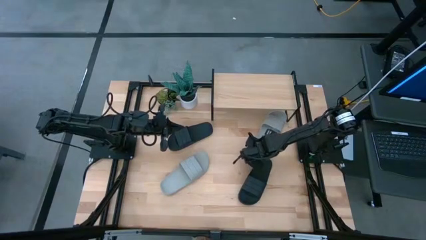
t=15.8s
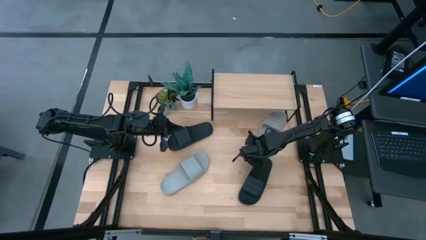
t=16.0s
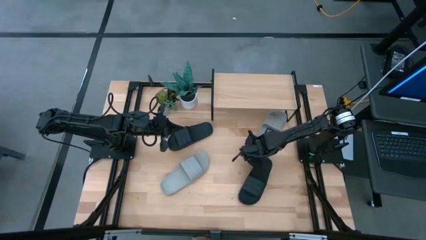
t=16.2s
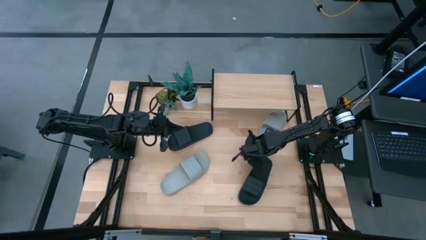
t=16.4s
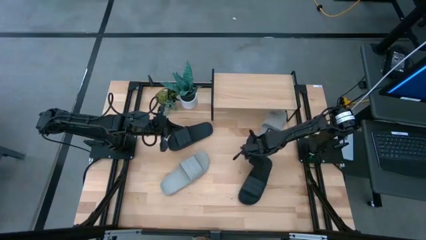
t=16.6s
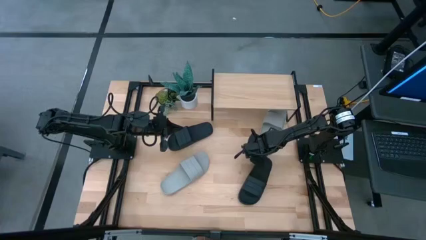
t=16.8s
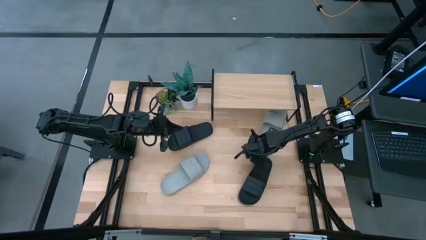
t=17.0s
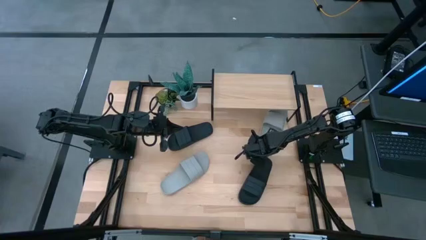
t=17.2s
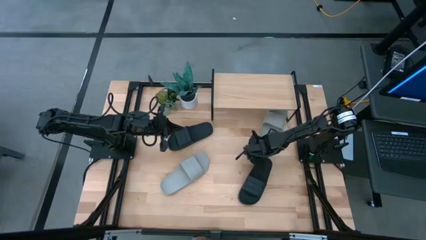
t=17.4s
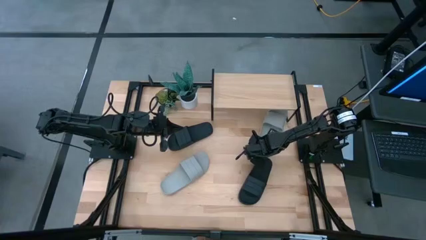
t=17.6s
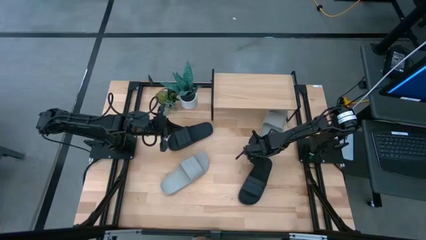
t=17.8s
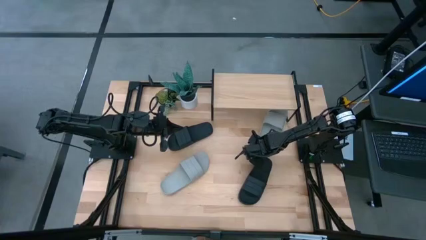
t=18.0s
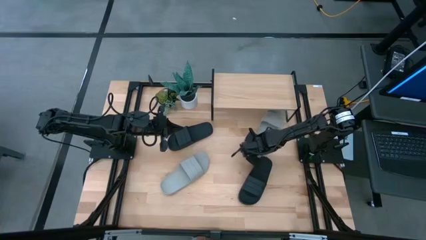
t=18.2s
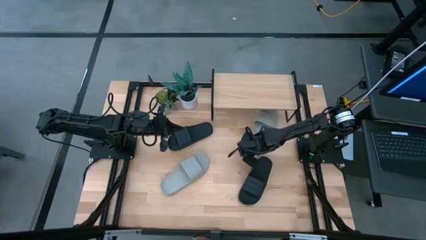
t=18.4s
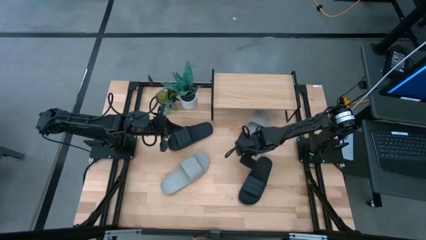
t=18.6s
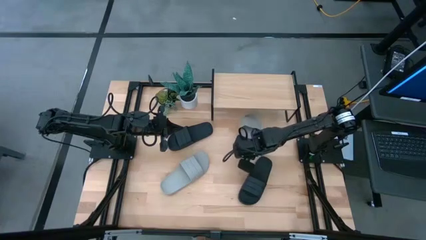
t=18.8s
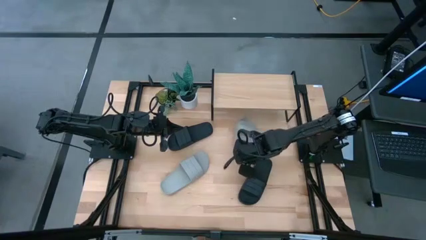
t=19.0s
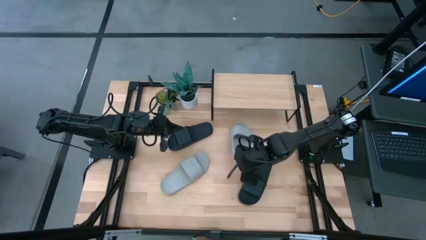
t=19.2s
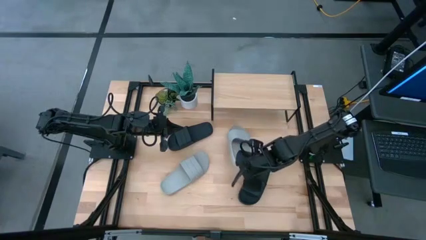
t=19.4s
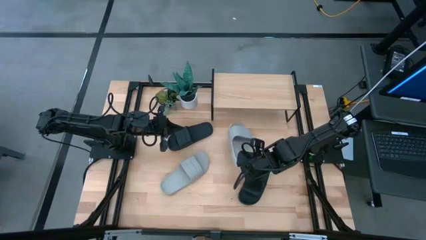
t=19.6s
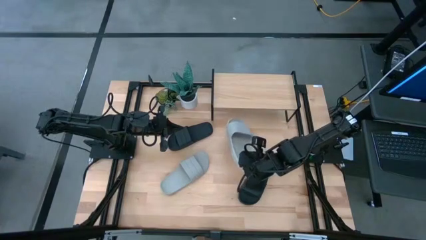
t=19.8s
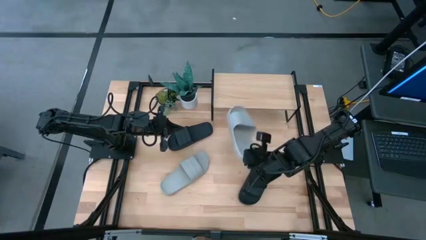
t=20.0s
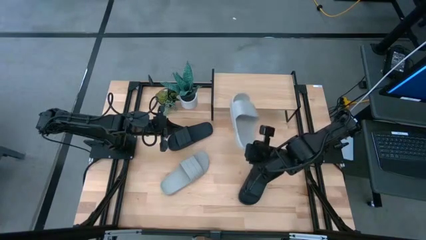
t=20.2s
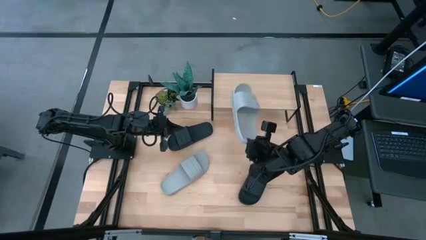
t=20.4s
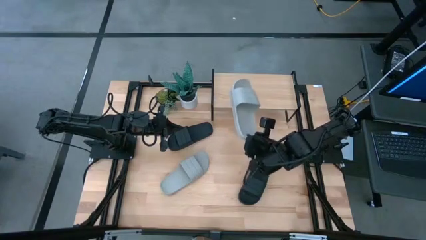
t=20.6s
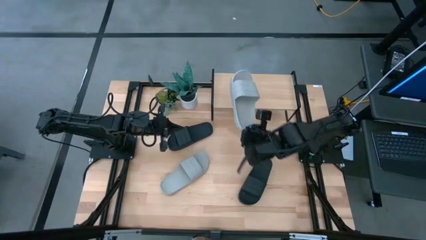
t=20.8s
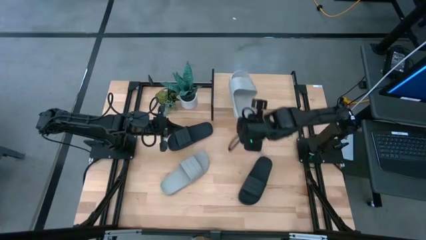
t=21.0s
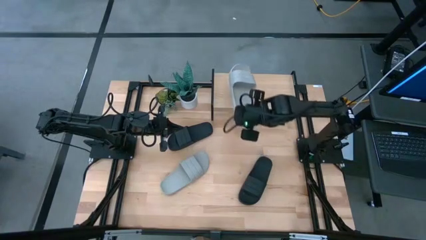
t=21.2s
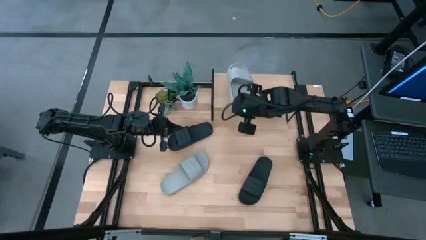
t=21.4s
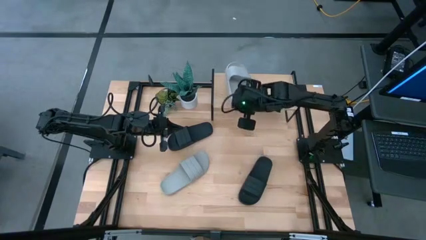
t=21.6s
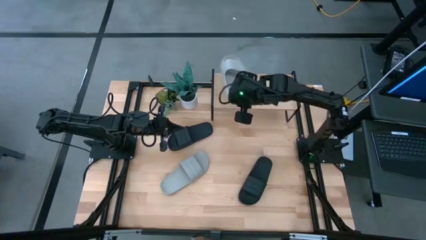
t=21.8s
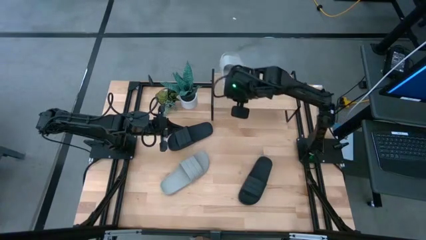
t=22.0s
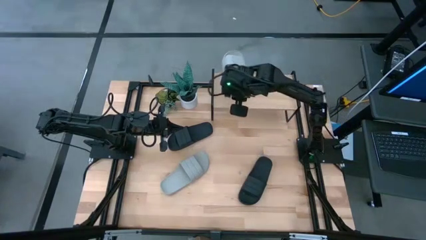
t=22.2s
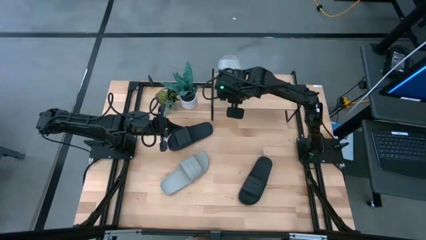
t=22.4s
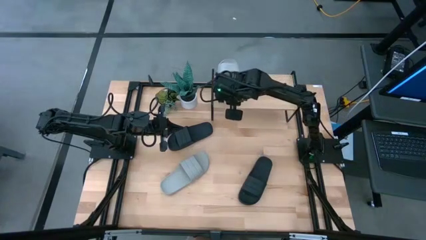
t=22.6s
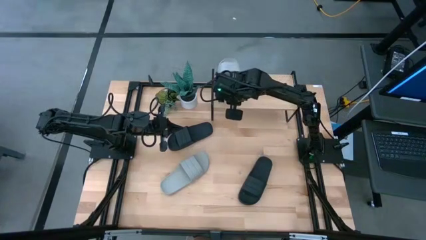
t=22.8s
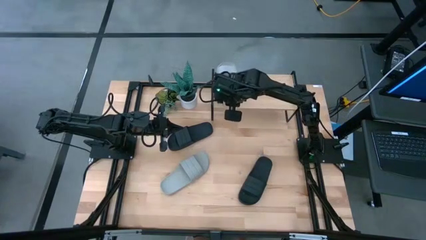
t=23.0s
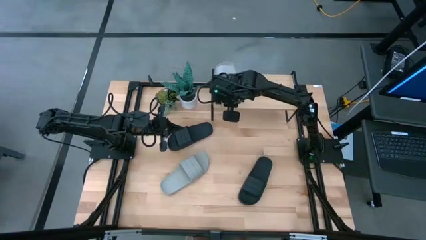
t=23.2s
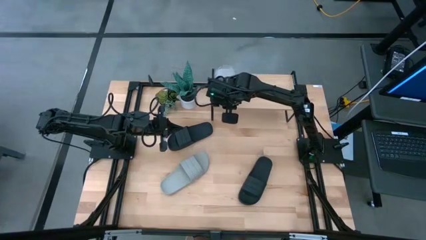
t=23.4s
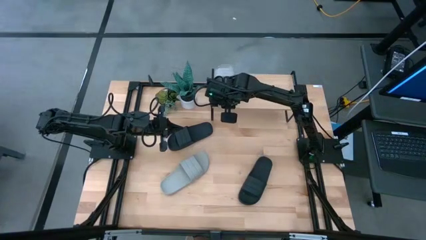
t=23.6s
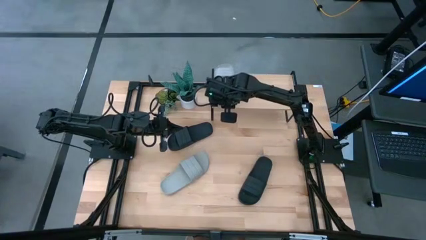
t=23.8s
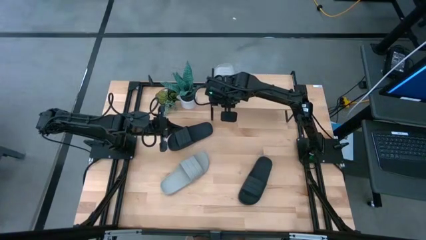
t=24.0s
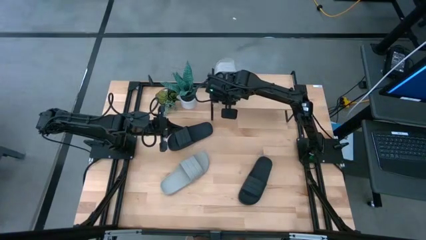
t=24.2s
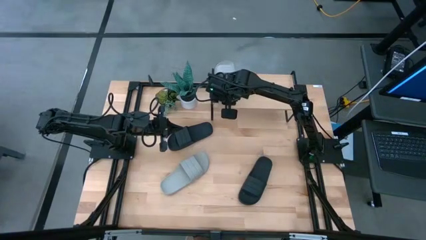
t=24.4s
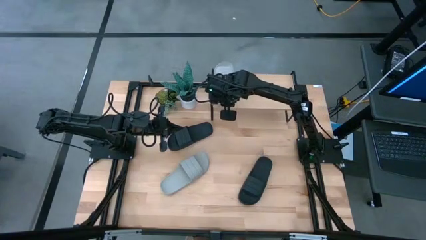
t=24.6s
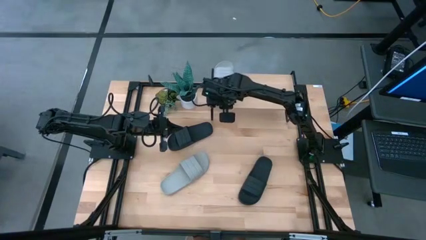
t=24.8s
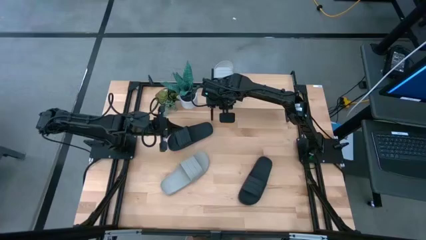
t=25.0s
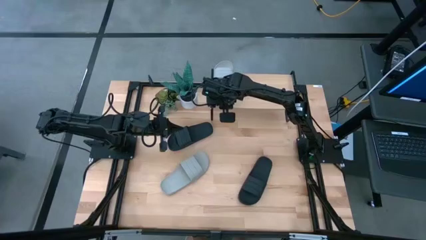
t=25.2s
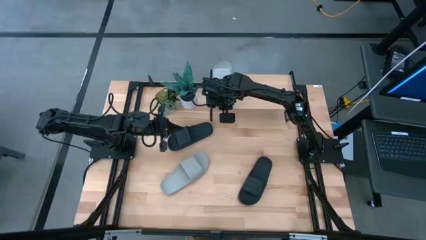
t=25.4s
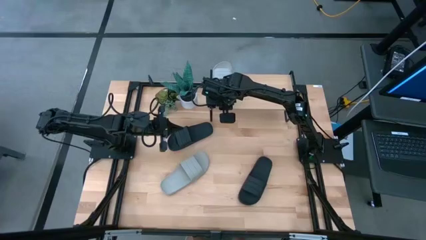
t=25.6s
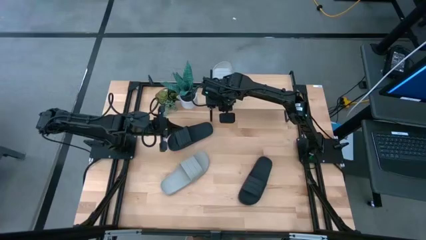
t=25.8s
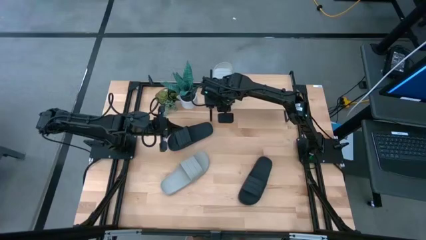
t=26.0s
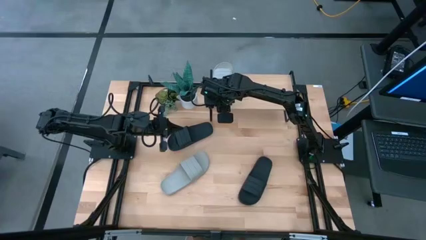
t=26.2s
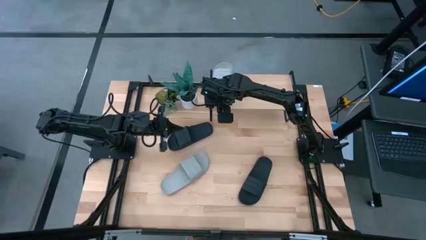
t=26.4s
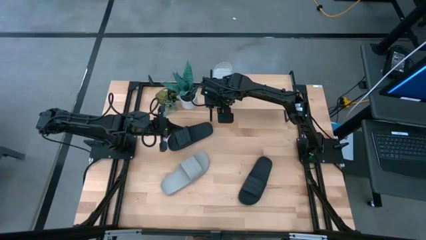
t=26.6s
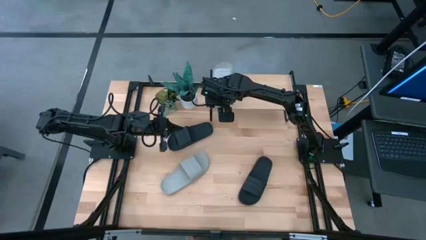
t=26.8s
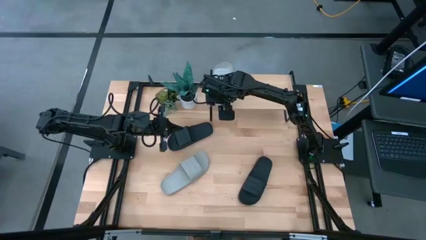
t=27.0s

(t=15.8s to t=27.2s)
Task: Pick and place slides into the shelf
Put the right gray slipper on the shelf

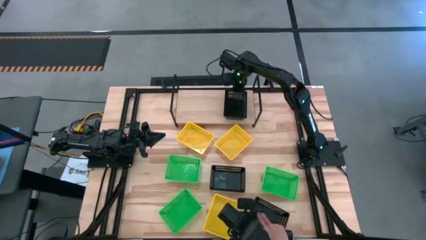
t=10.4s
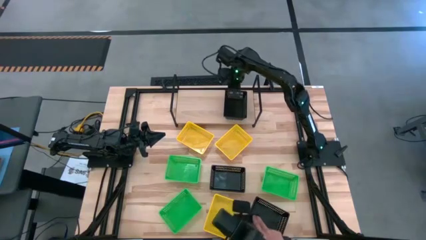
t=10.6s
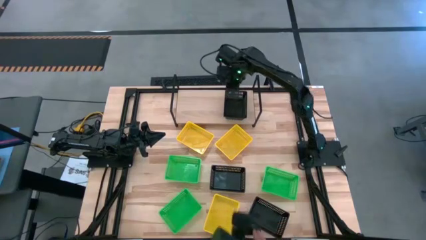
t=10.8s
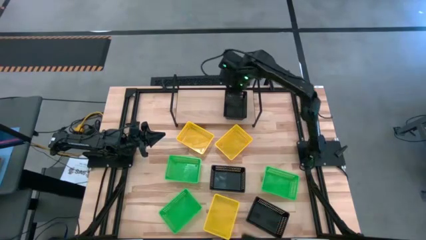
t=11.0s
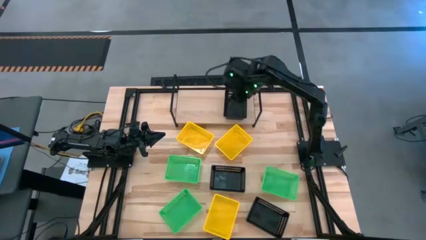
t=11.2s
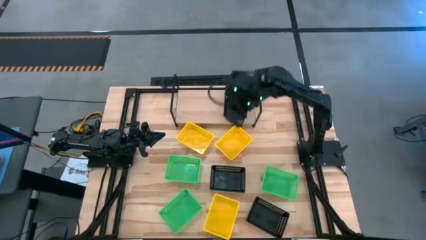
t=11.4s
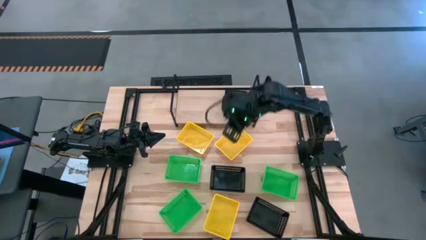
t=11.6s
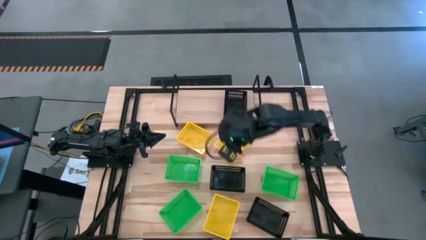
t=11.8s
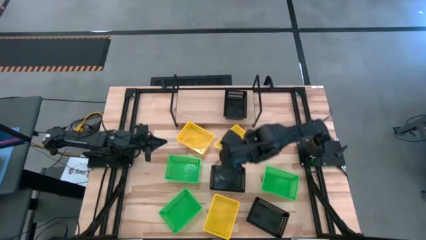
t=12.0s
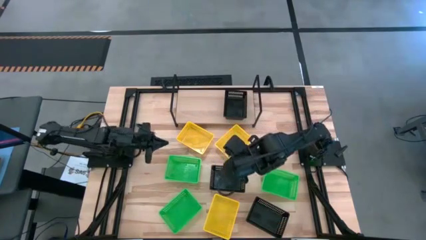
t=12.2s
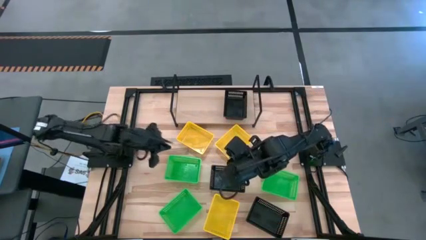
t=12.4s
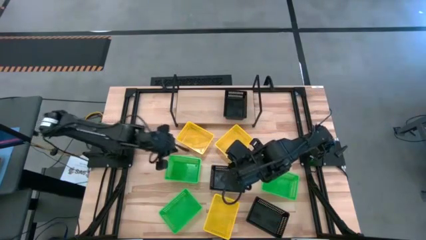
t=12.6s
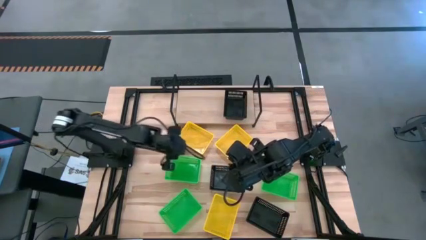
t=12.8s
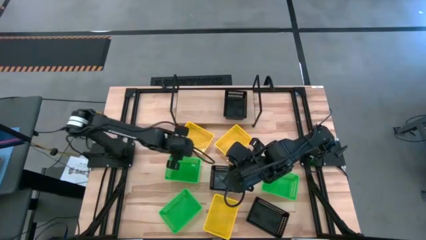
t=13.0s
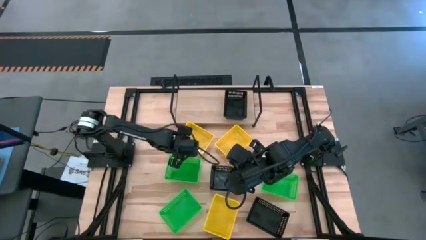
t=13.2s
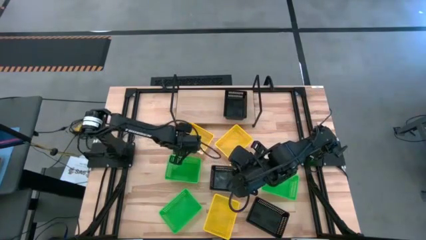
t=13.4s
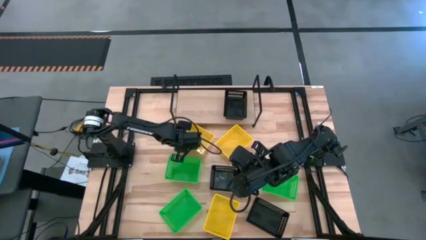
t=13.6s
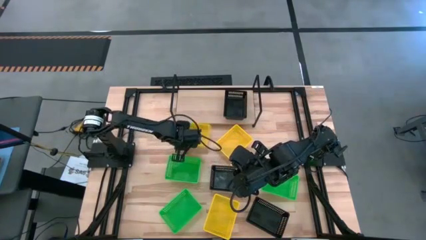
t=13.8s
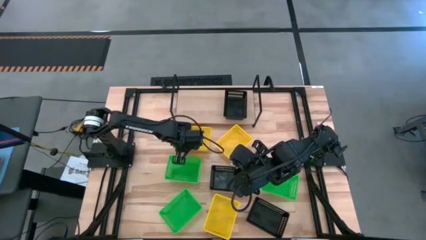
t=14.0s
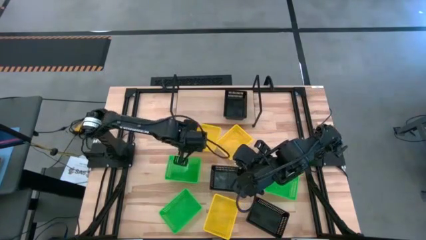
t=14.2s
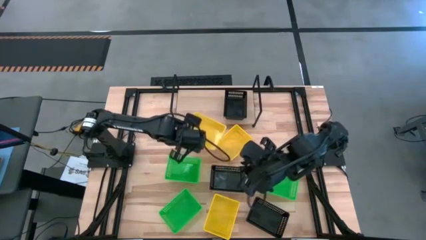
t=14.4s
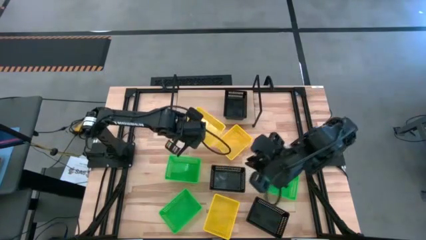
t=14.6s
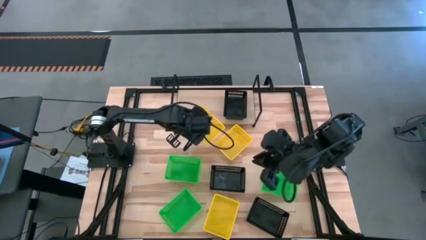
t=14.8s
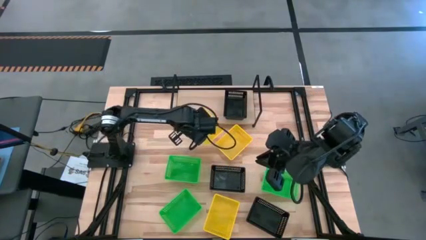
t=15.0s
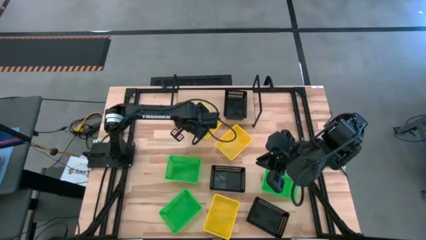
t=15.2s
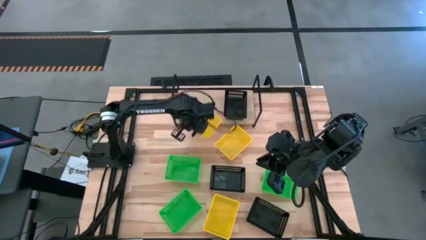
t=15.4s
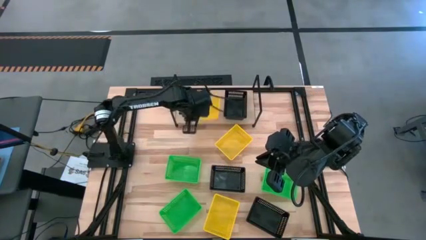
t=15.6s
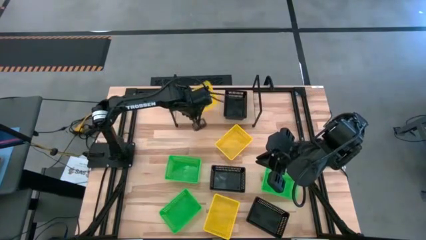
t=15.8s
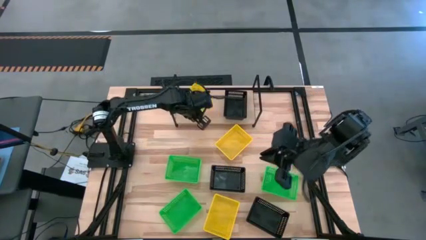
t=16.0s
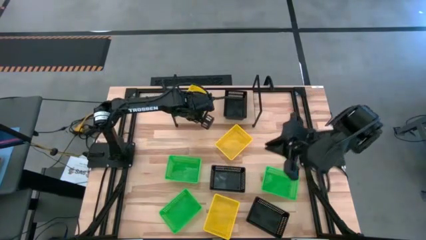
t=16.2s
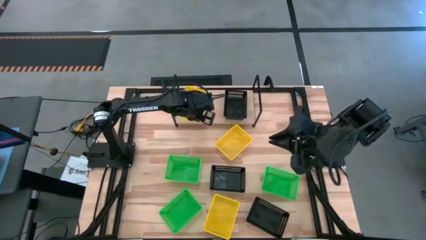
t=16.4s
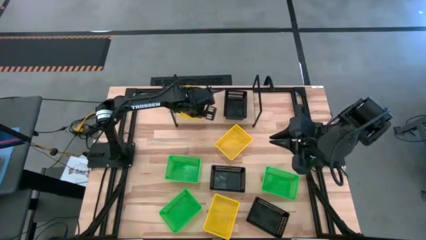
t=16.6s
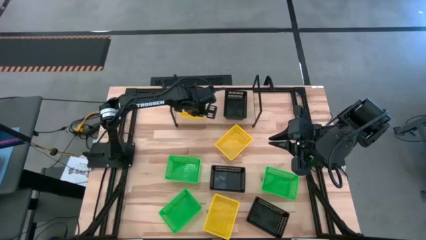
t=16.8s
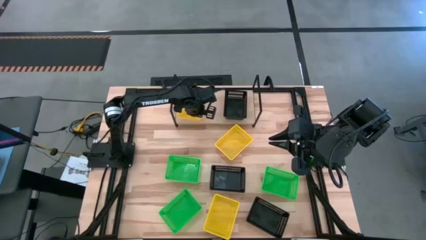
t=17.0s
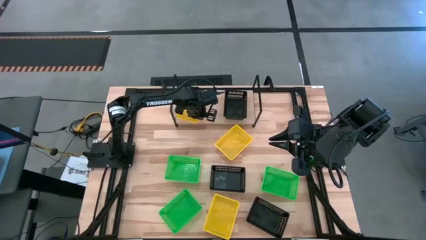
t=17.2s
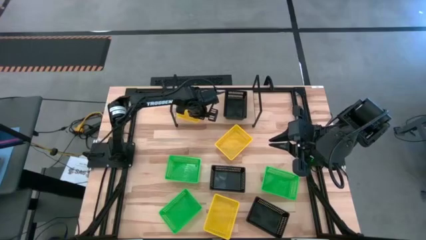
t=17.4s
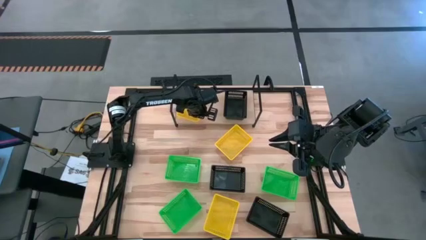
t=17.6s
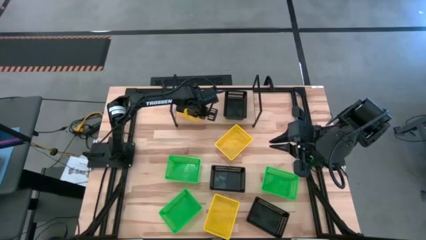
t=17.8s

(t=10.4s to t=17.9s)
Task: Stack baskets on shelf by color
Put the left yellow bin on the shelf
